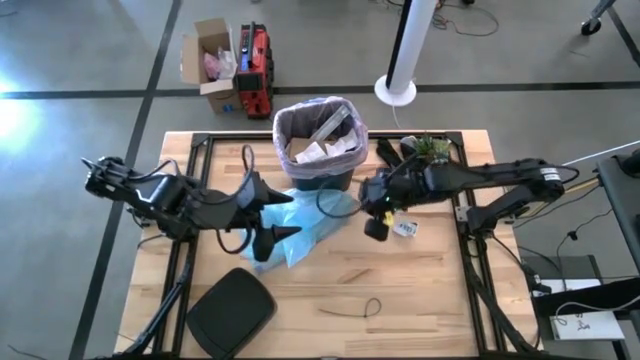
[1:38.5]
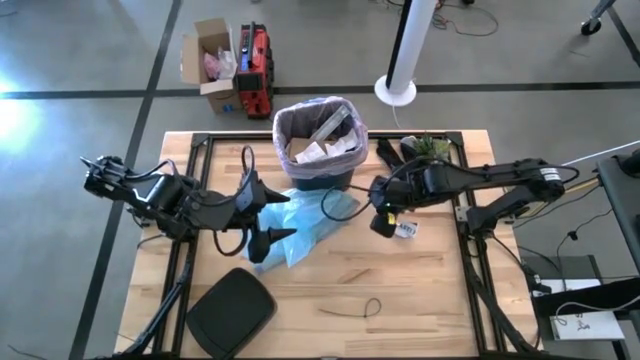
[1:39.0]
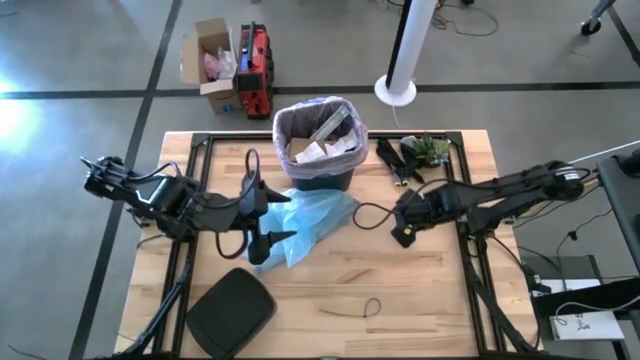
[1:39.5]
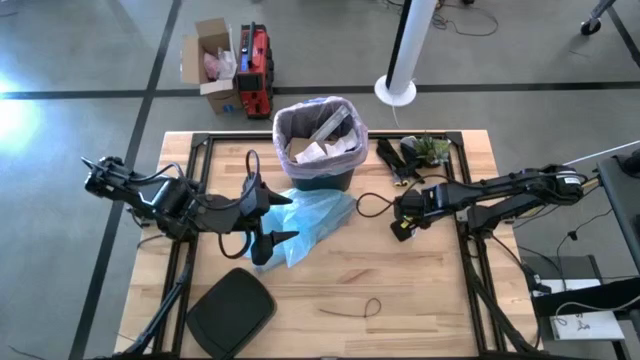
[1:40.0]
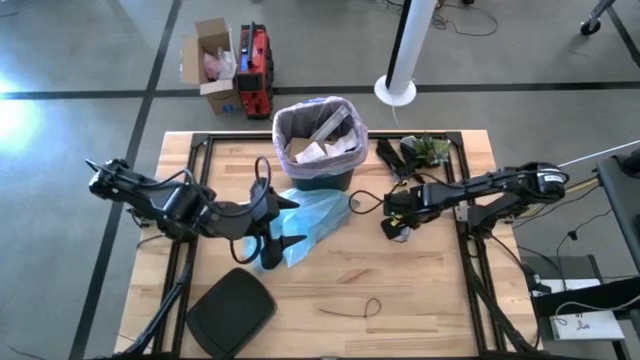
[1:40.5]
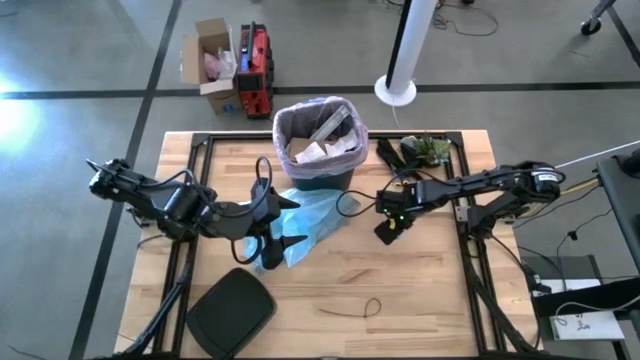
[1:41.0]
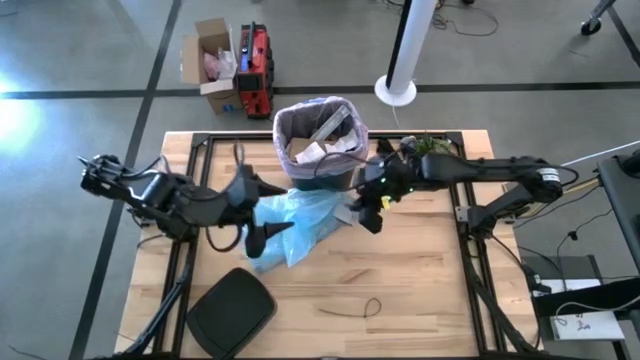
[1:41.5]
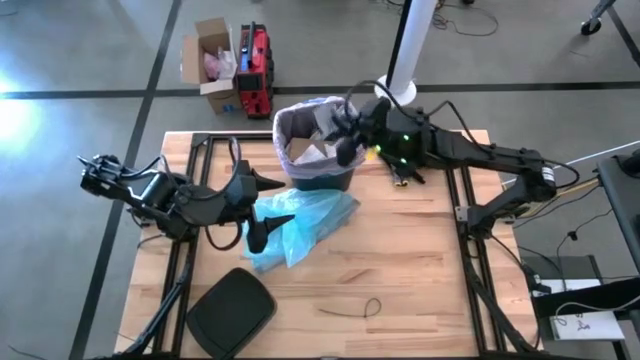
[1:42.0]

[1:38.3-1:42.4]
Task: place trash/remove bag and relplace
Put the white paper into the trash bin

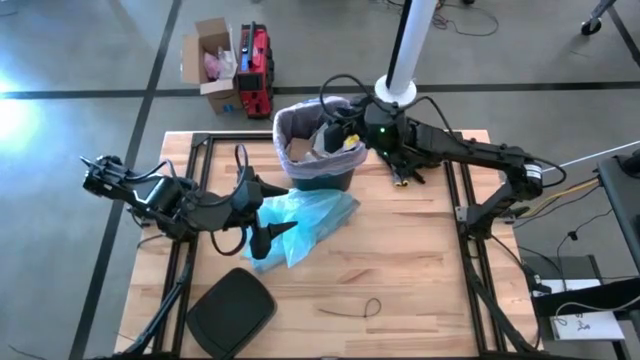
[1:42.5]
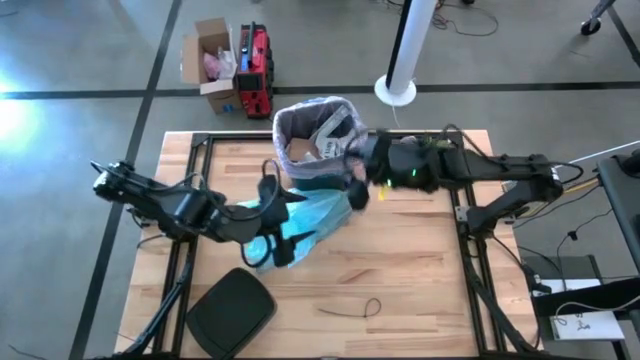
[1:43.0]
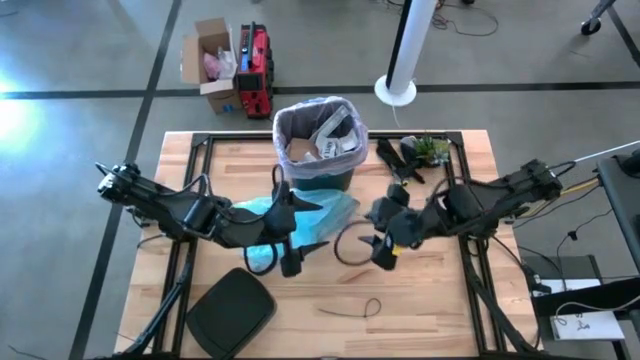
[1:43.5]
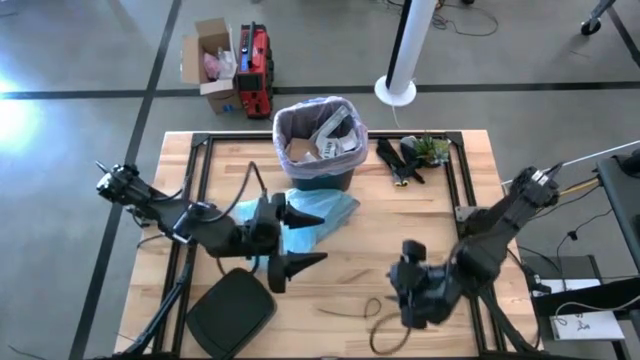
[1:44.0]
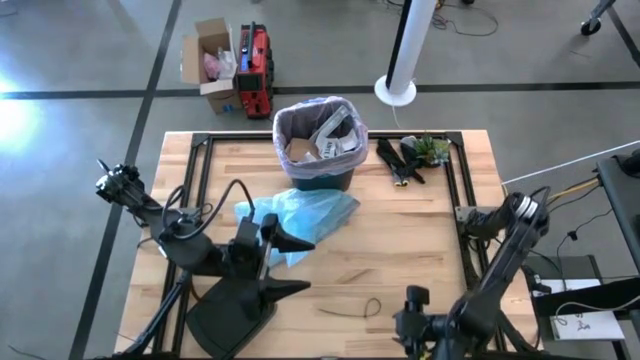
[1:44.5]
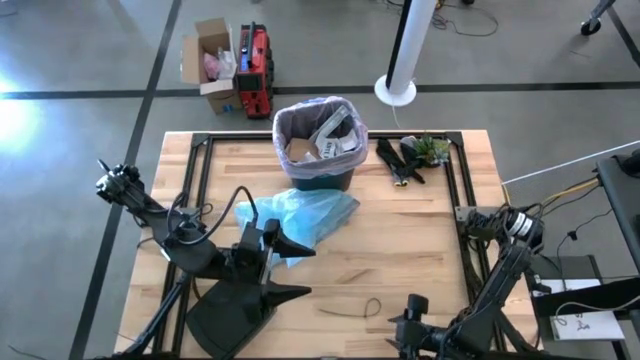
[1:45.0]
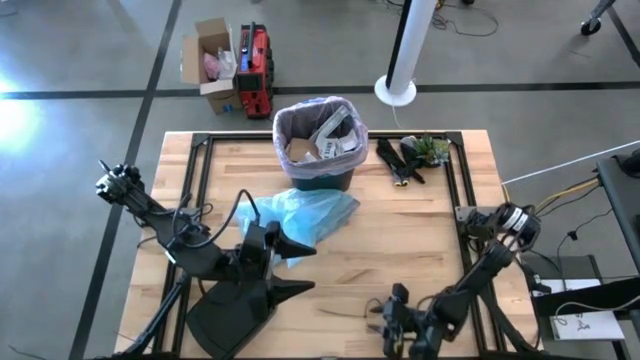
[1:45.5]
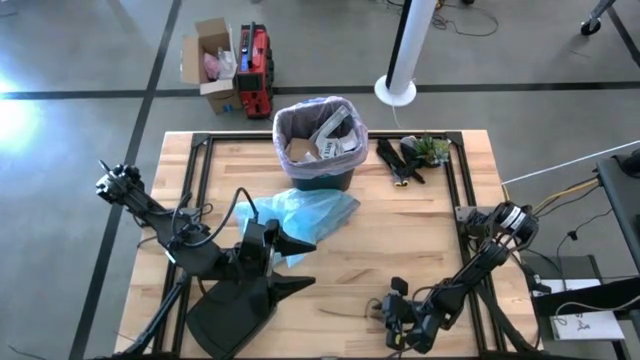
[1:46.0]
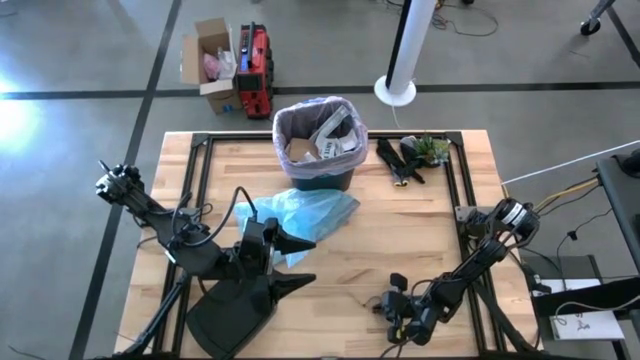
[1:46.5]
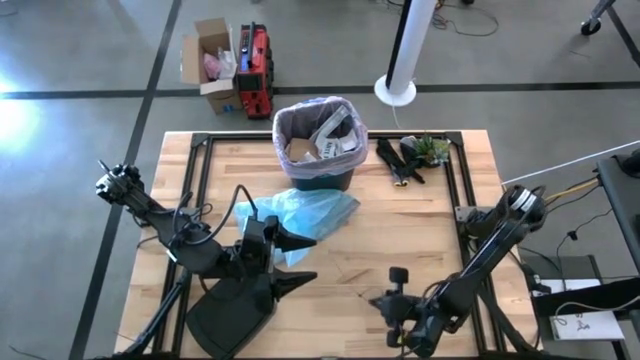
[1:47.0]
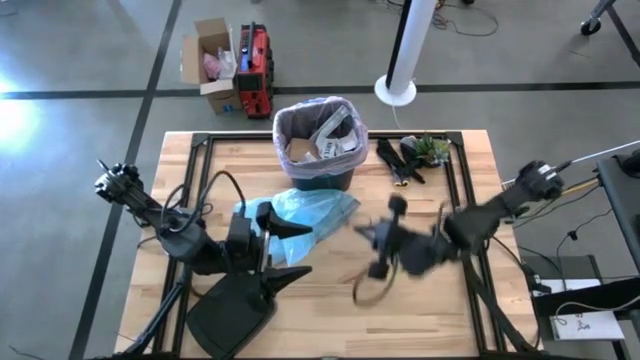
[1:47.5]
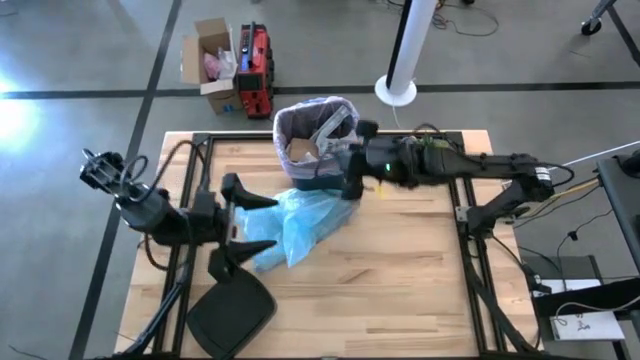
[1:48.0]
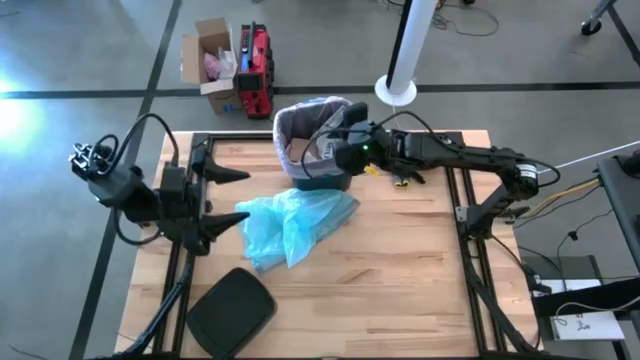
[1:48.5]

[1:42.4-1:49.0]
Put the zip-tied color cables into the trash bin

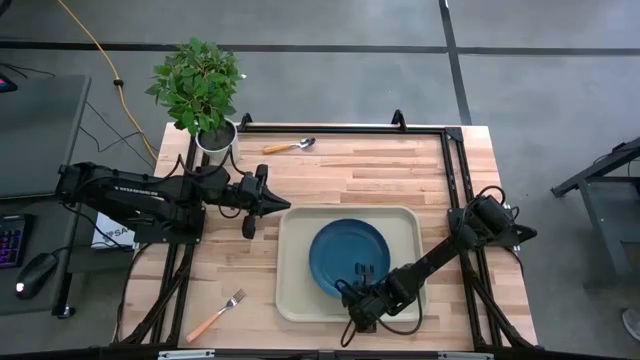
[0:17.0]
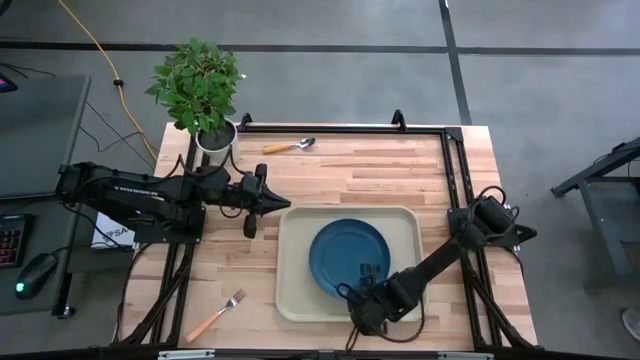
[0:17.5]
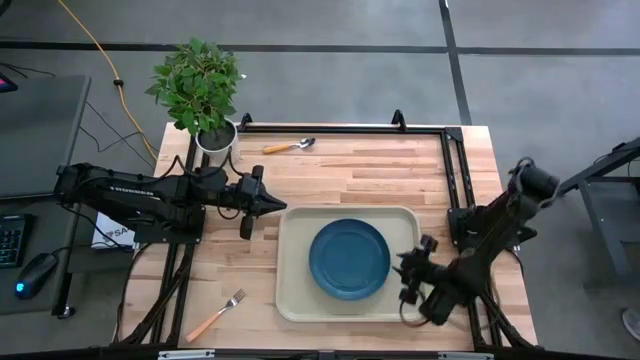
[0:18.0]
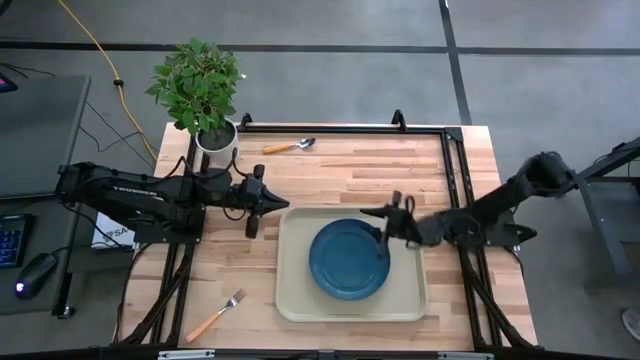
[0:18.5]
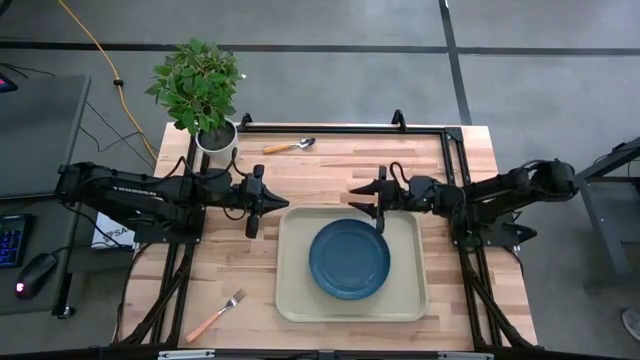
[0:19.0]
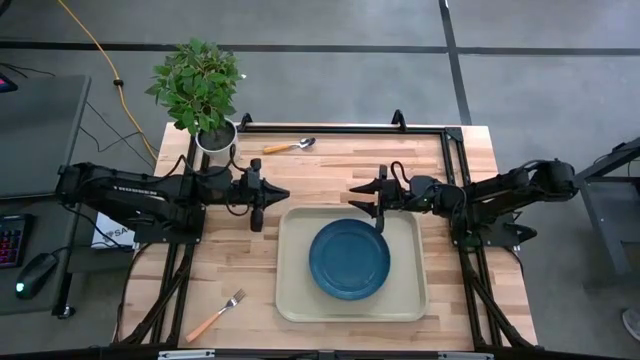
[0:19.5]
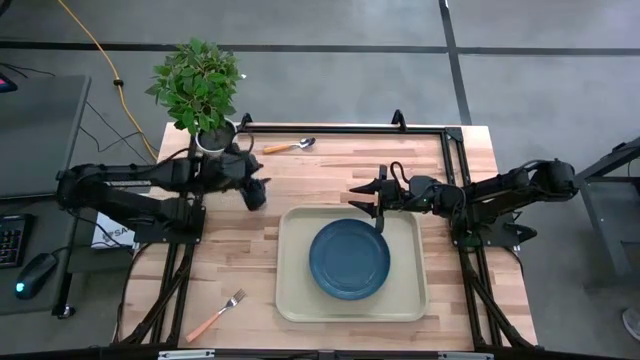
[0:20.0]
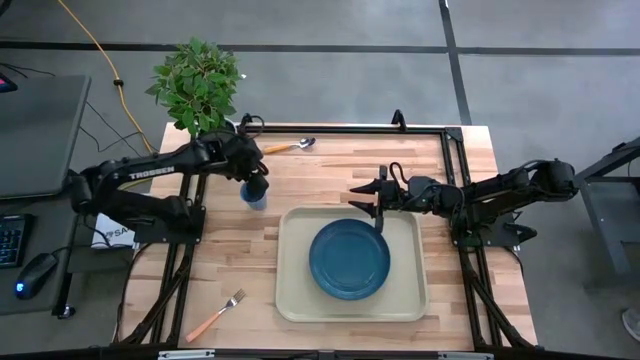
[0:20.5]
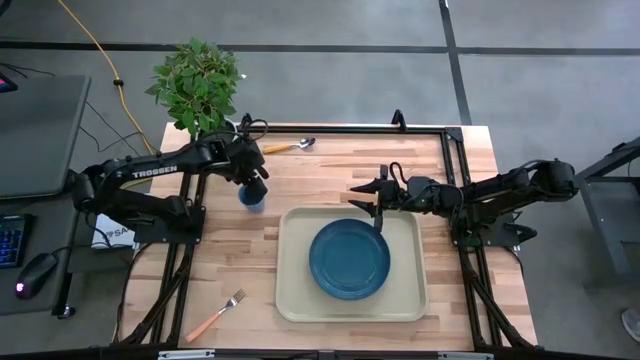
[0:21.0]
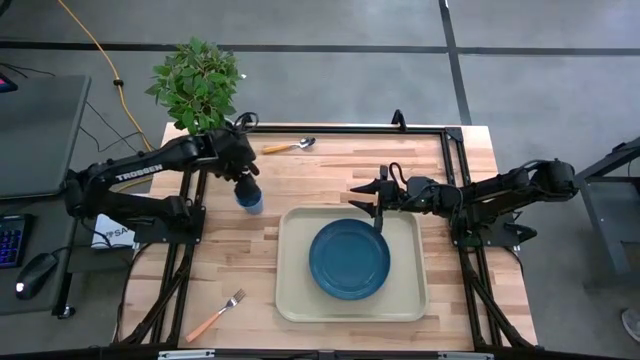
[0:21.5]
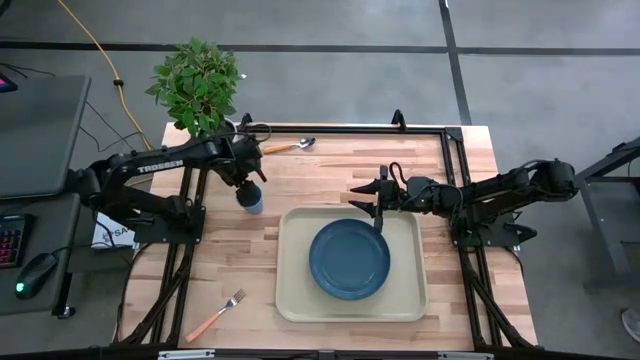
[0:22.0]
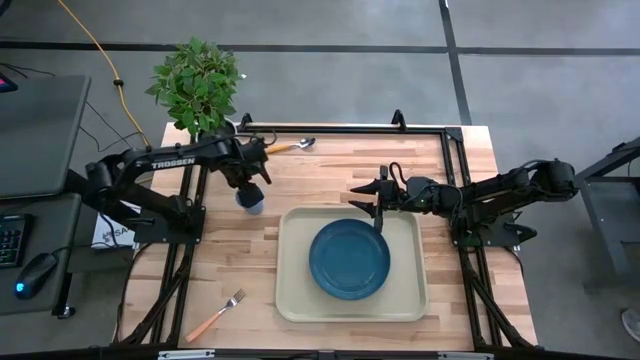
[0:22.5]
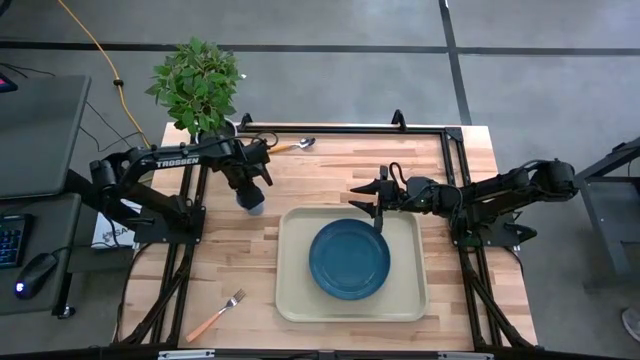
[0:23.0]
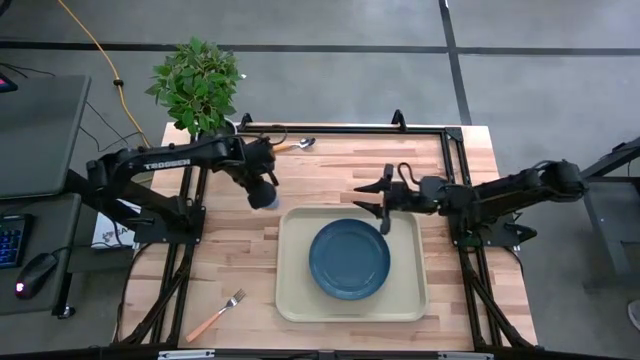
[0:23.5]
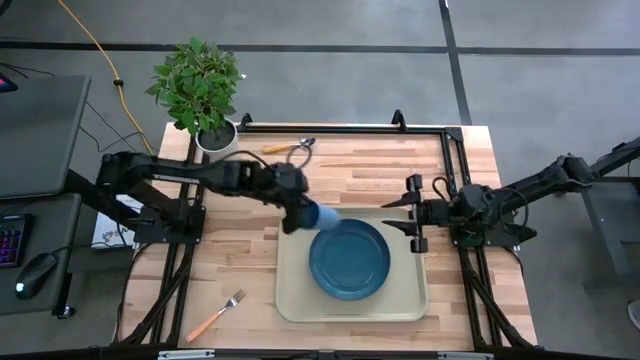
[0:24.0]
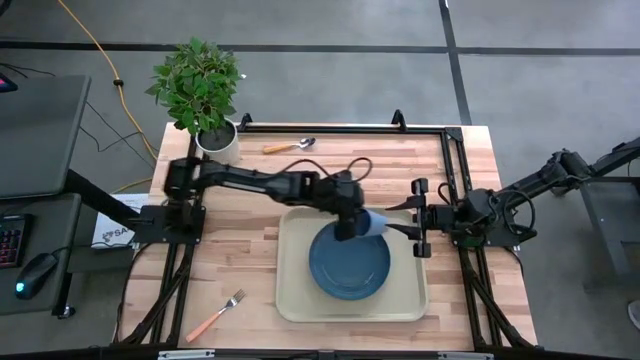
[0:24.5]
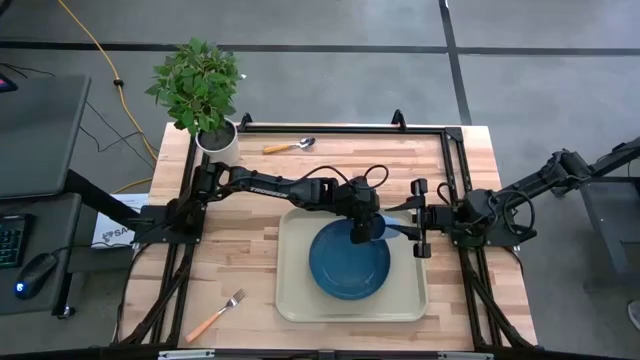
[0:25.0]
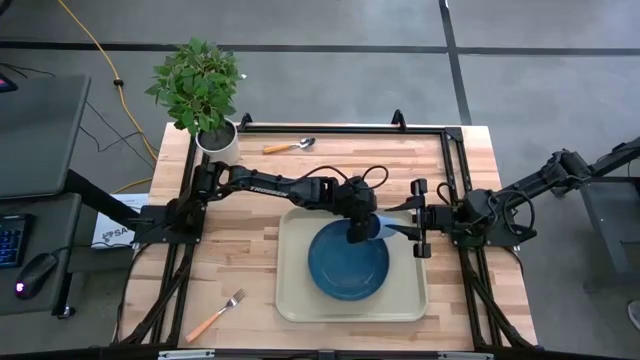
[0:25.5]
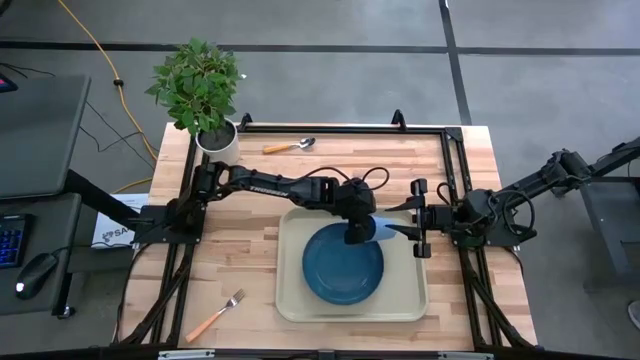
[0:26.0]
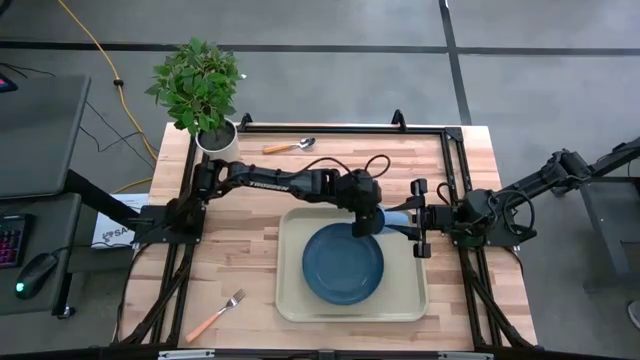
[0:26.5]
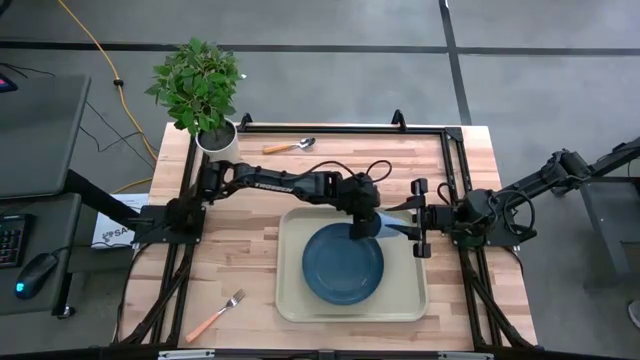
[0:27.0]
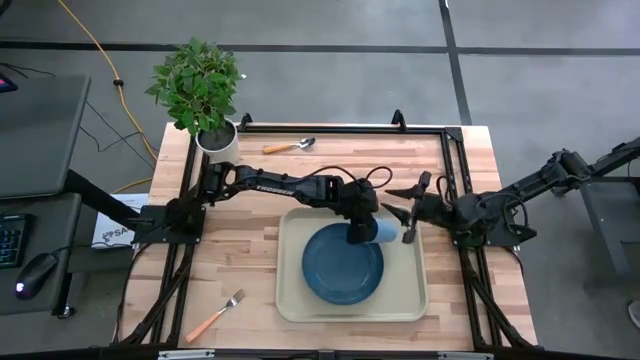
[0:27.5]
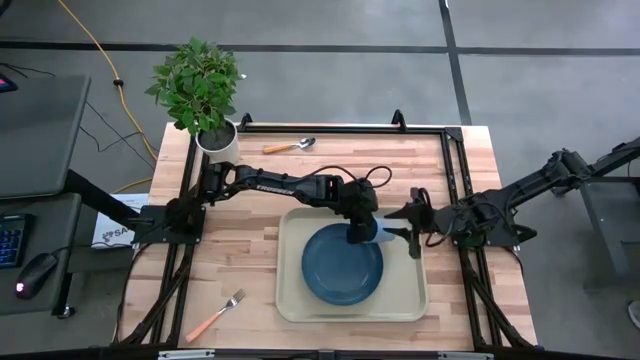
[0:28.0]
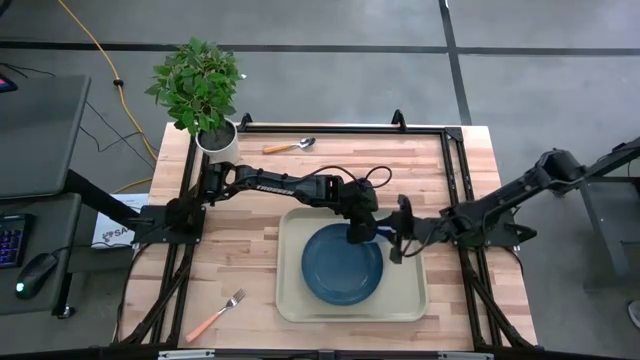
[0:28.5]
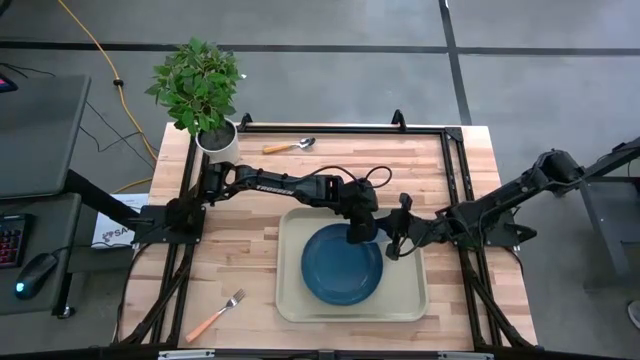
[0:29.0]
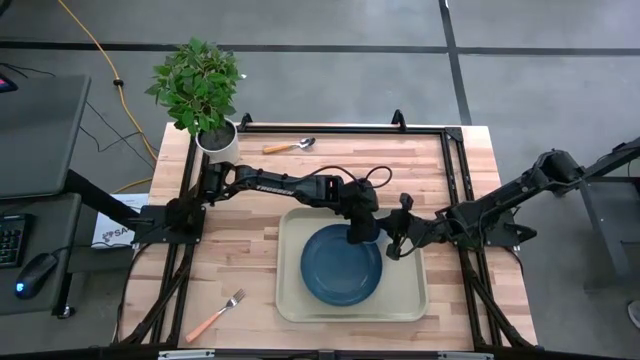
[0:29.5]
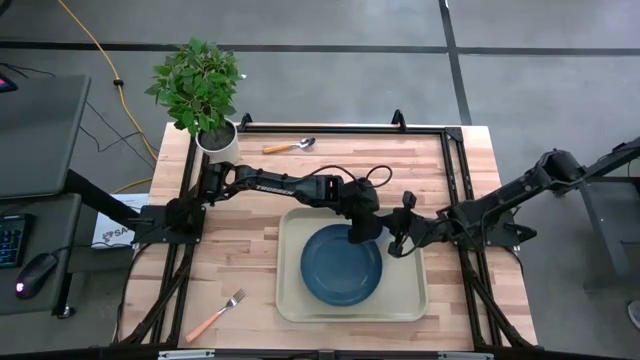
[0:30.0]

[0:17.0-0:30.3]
Task: Pick and place plate/cup/fork/spoon on tray
Put the blue cup on the white serving tray to the top right of the blue plate
